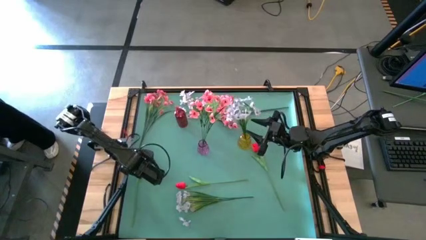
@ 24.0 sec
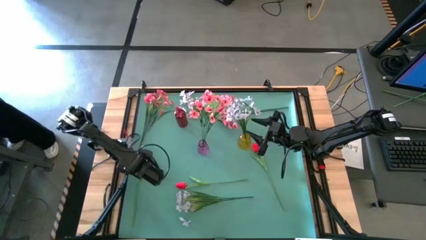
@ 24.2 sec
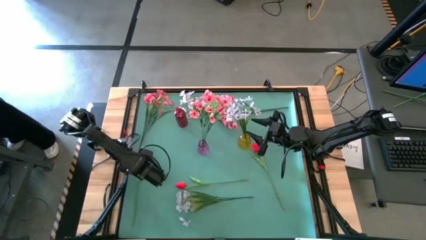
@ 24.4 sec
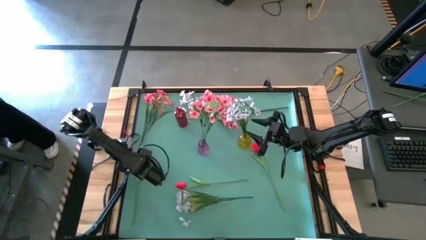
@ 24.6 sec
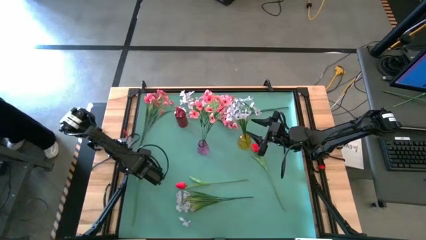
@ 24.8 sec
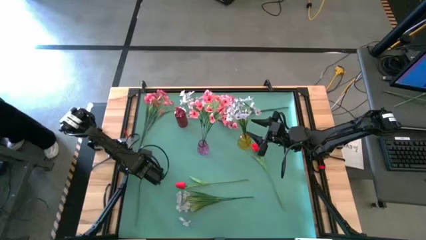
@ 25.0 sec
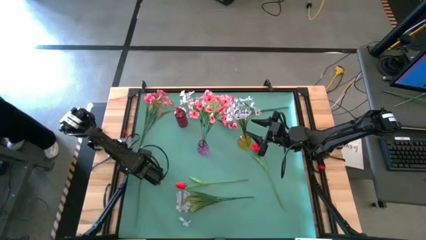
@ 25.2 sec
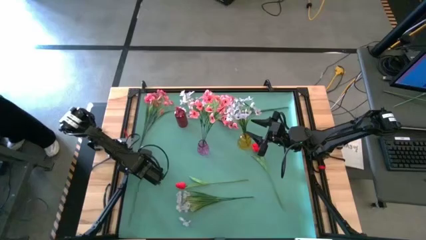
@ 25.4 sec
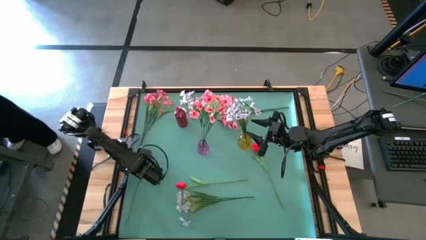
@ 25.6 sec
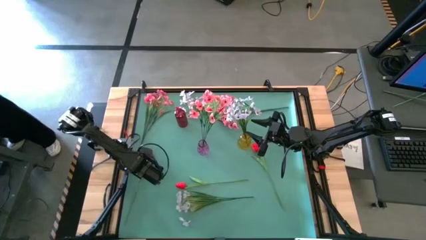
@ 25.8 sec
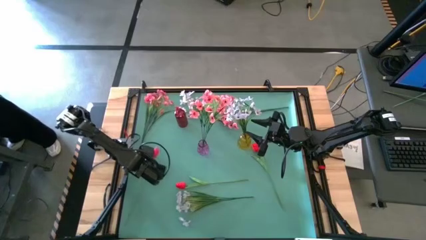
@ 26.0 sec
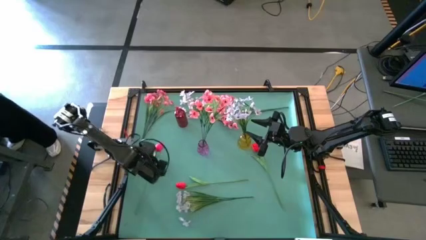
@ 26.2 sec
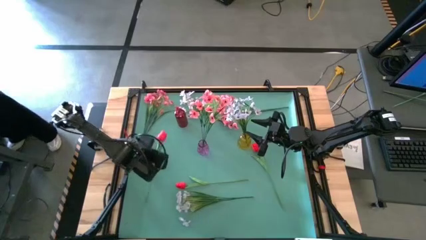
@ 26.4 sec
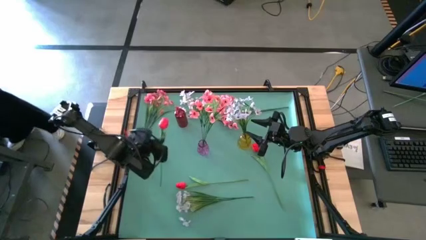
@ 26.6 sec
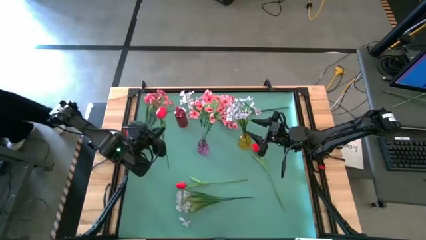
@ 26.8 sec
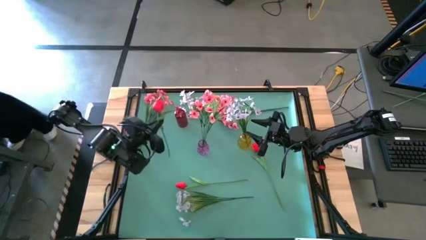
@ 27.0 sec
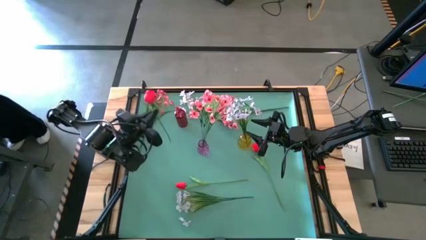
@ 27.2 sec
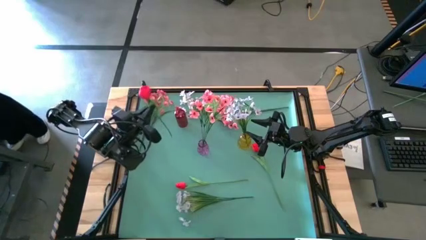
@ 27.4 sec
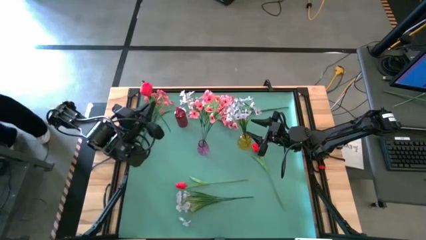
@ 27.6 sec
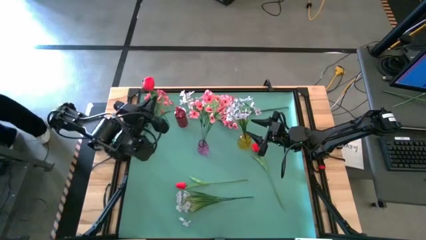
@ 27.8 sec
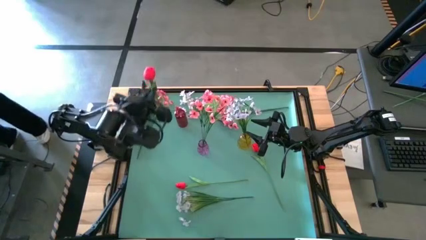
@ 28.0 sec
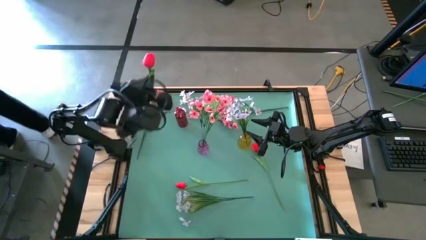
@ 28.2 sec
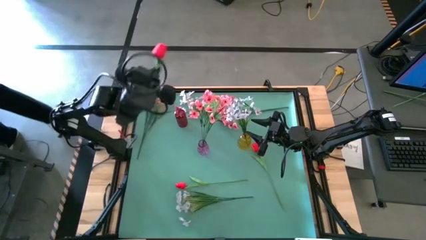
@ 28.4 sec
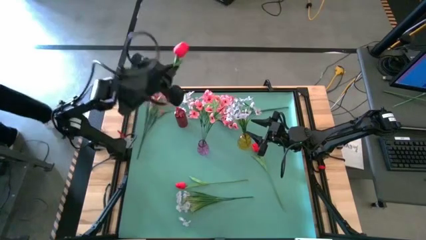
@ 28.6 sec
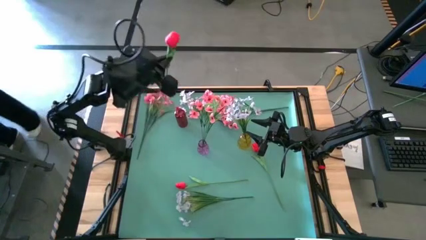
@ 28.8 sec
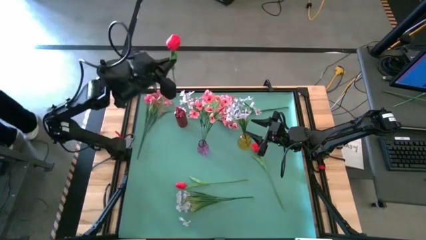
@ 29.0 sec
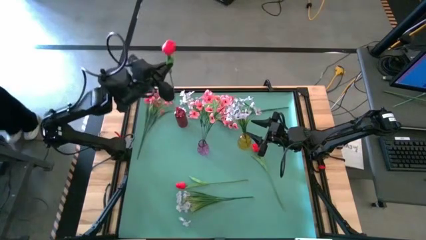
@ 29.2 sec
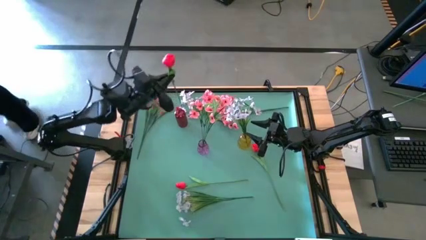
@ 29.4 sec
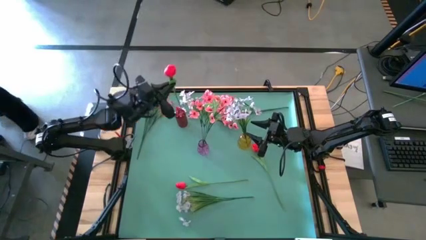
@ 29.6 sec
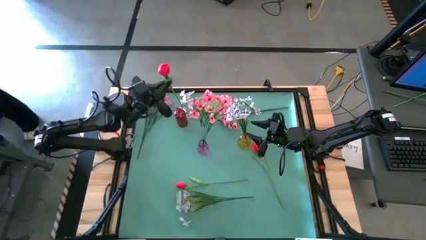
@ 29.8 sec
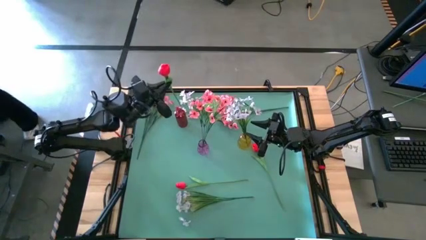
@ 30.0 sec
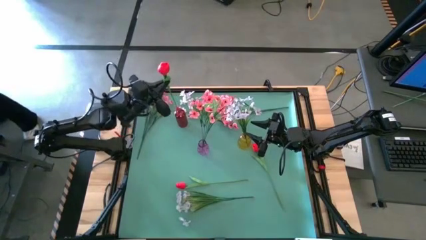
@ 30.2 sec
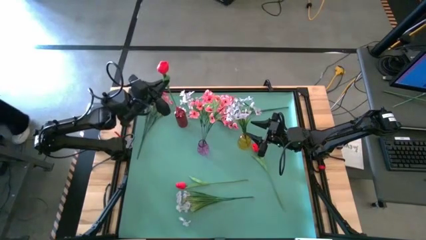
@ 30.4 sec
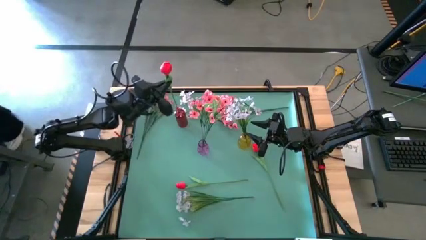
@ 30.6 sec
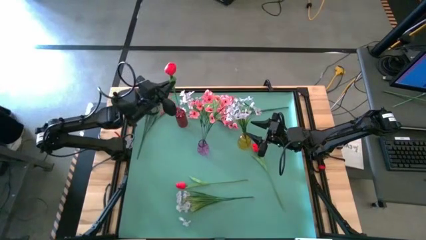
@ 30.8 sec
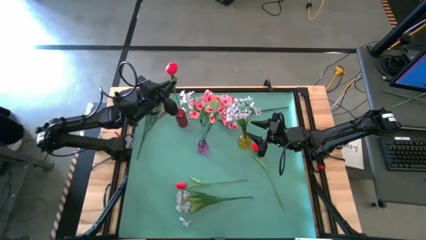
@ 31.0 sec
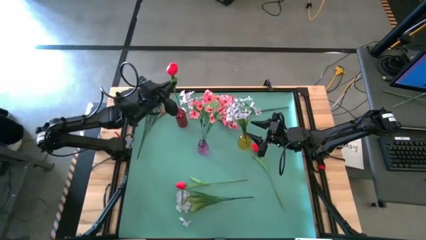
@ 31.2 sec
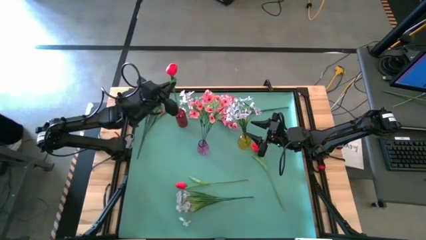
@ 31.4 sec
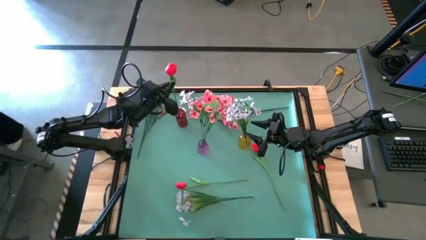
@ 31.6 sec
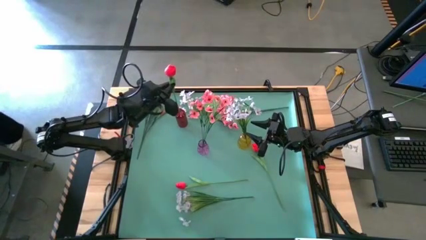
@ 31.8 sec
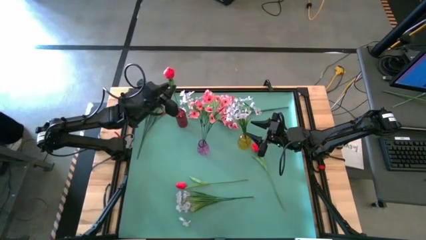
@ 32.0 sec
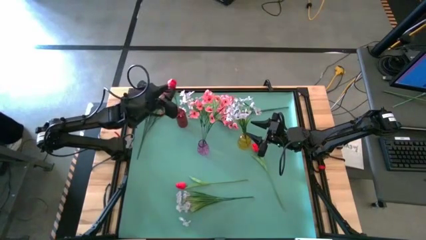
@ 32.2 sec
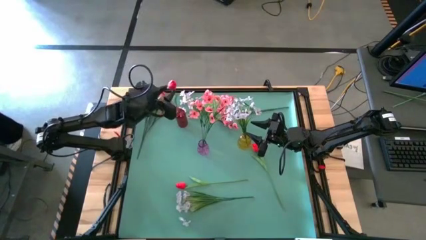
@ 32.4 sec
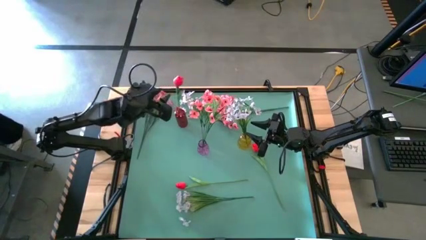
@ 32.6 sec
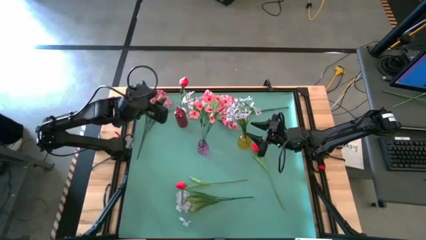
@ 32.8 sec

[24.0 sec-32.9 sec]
Task: Sort flowers into vase by color
Put the bottom left red flower into the red vase

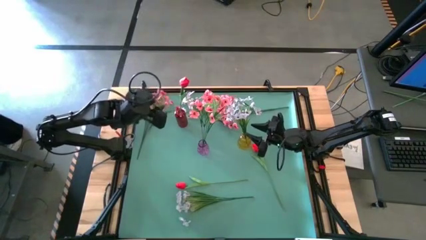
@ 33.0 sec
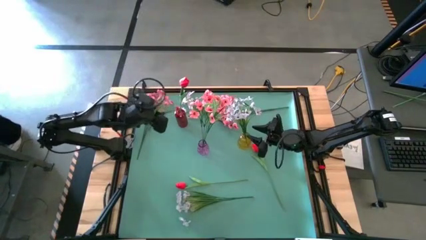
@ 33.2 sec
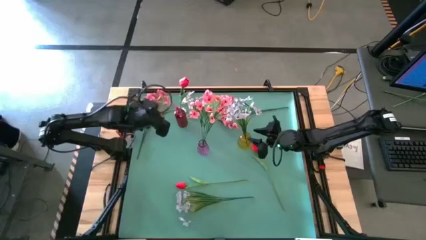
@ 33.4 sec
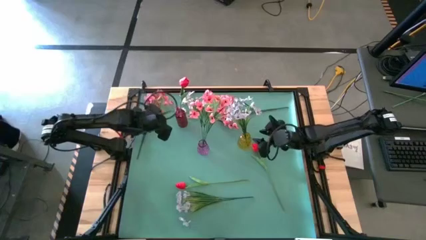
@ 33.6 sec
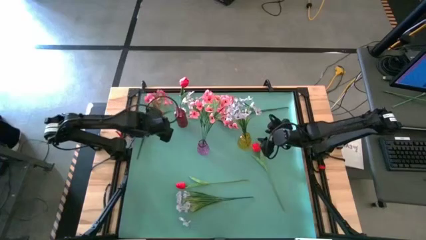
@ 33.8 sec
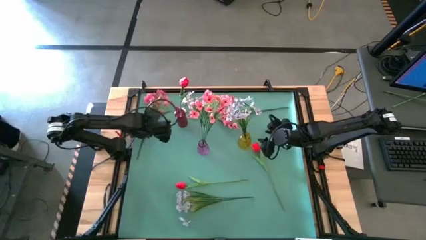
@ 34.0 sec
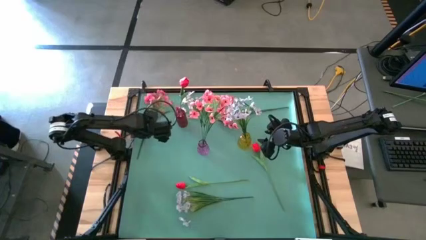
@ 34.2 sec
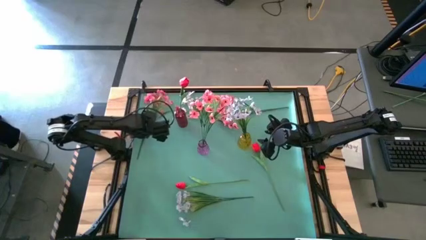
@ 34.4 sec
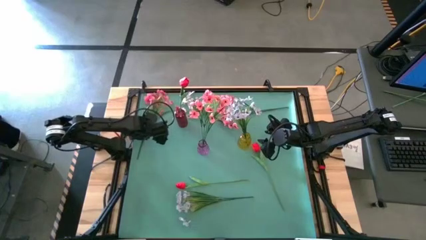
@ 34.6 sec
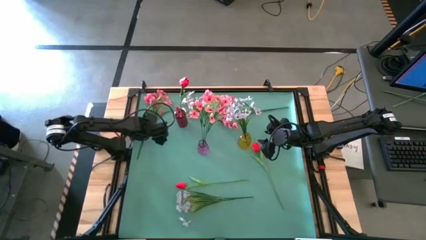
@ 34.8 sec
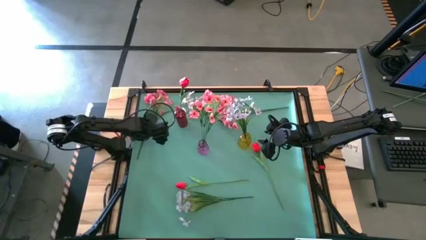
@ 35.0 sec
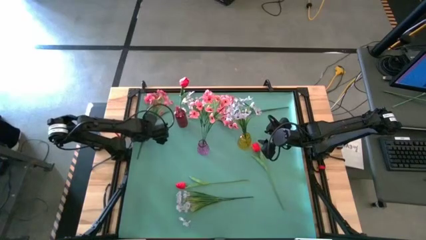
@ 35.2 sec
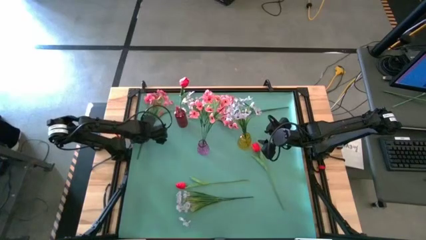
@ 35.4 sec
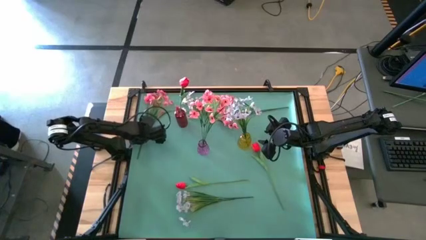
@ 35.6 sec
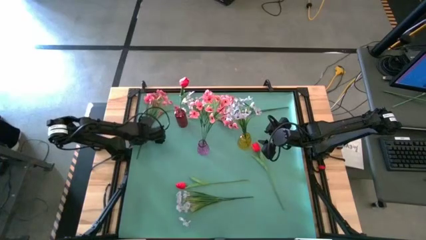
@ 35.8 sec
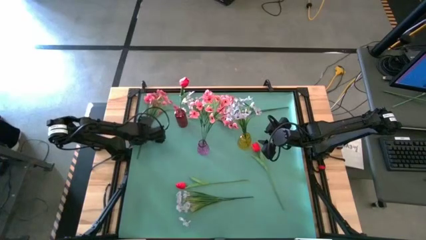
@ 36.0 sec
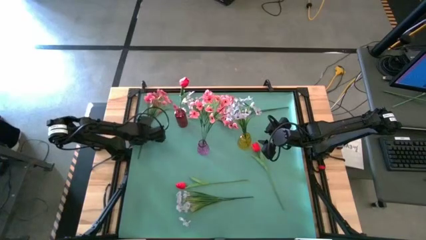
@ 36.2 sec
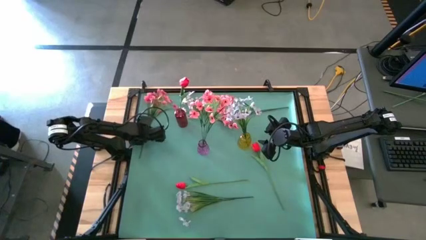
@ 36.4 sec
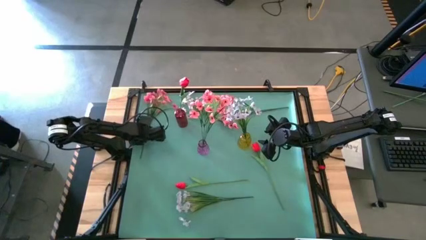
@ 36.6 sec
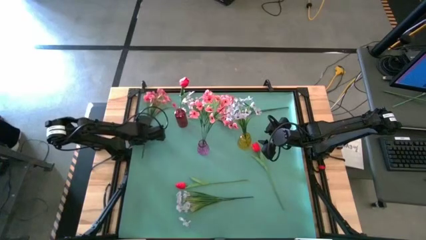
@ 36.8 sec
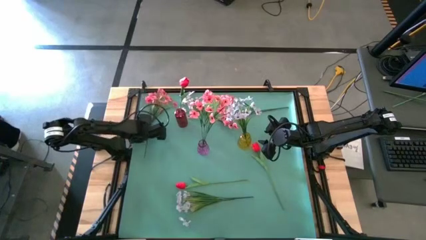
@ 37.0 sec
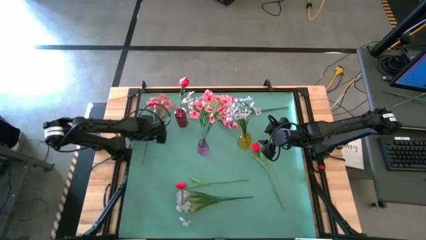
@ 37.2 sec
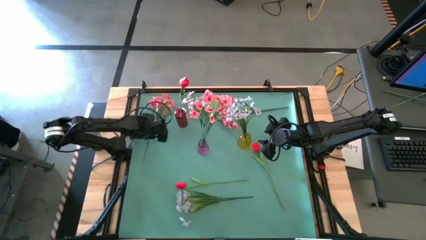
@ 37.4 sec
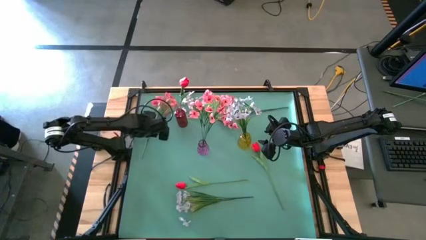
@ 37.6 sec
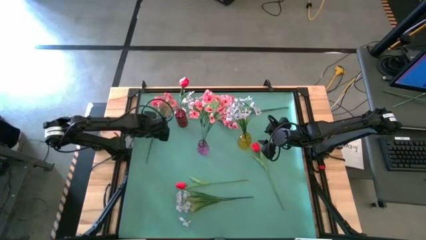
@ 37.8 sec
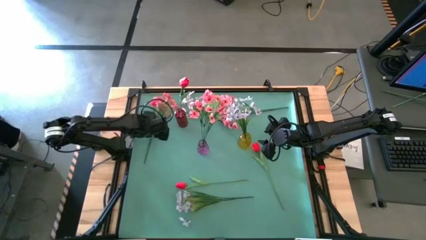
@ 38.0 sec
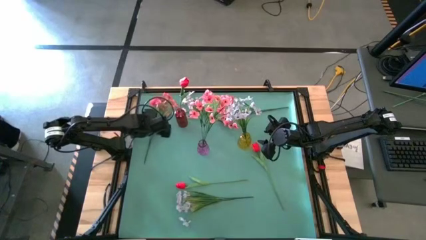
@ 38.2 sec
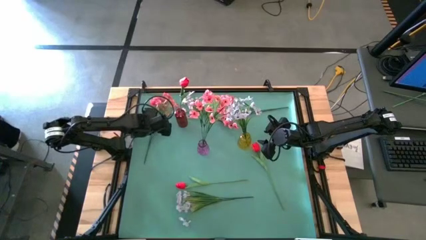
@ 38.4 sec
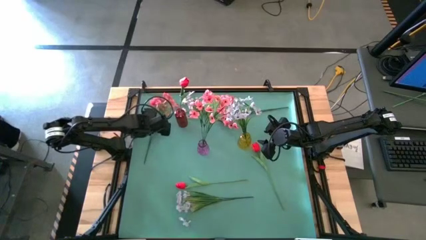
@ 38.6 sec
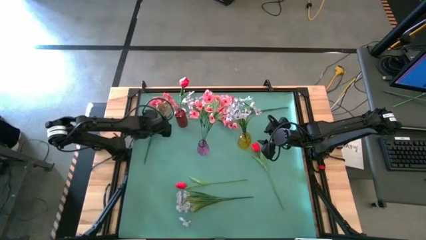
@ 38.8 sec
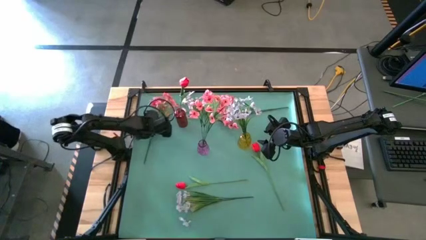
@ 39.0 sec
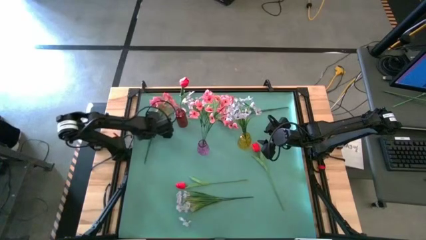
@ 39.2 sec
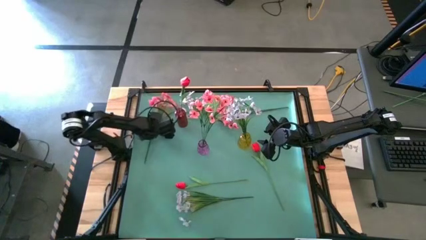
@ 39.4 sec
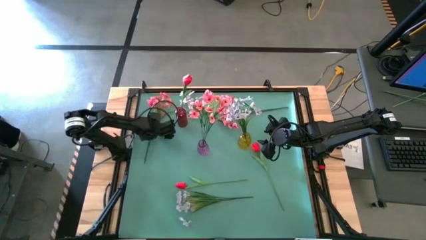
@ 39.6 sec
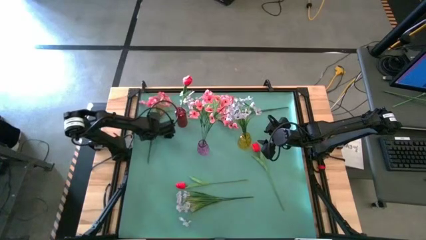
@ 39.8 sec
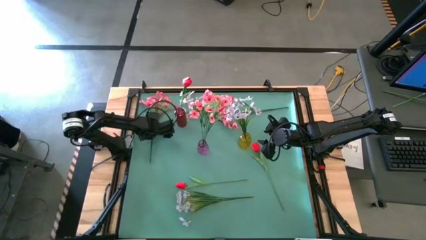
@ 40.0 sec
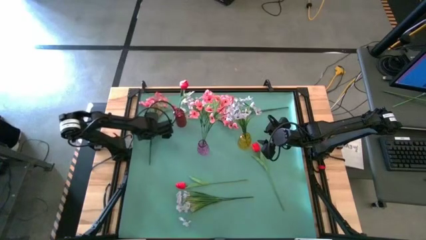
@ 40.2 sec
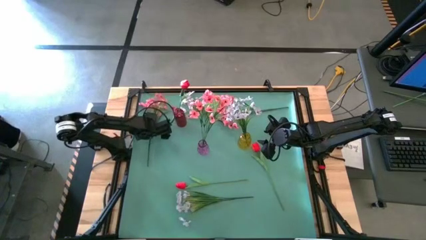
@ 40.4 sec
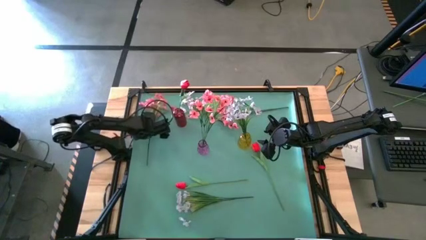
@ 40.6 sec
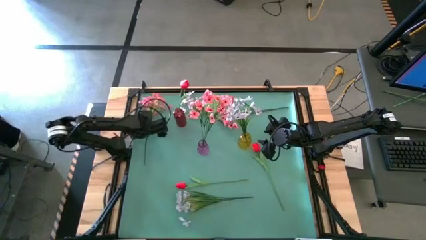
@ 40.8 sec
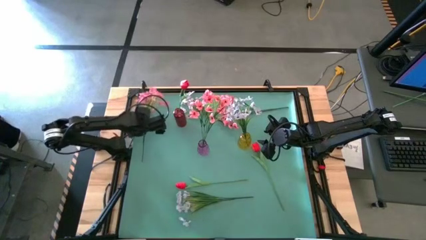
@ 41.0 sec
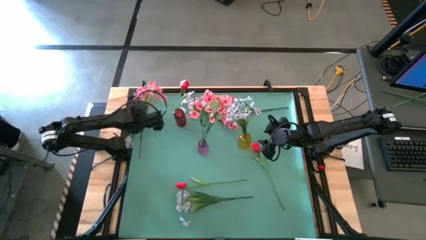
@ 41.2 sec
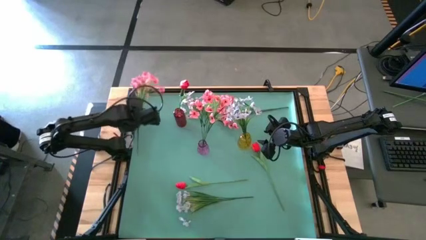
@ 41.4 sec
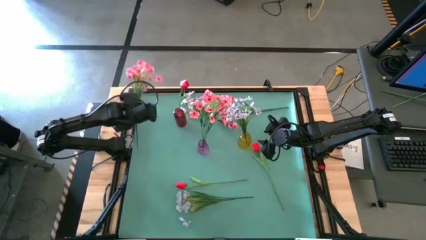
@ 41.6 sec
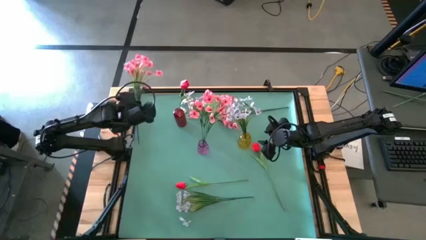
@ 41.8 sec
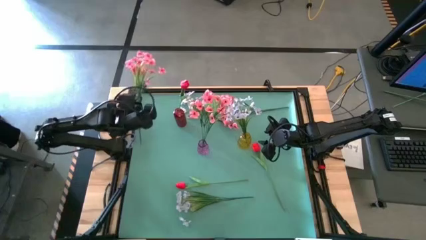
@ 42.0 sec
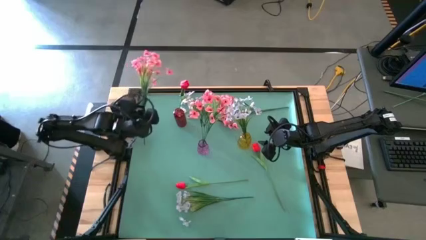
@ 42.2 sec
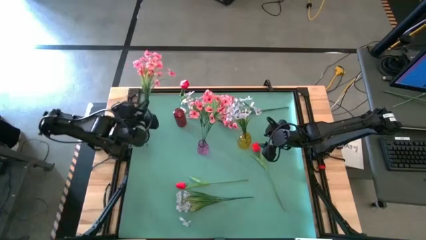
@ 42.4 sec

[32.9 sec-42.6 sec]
Put the left pink flower into the purple vase
